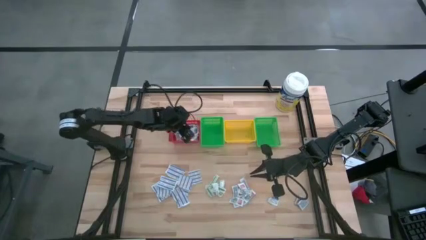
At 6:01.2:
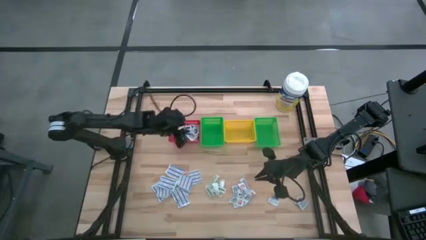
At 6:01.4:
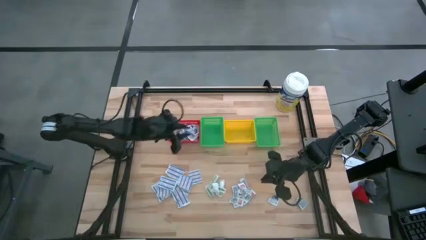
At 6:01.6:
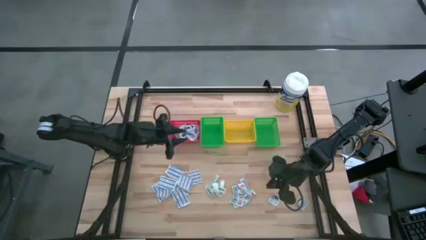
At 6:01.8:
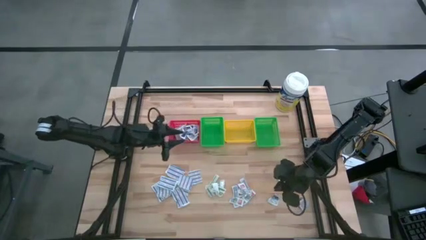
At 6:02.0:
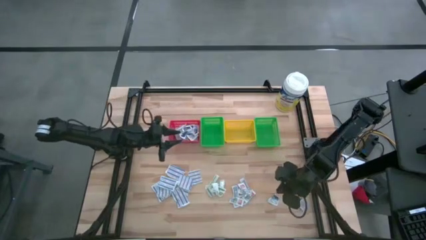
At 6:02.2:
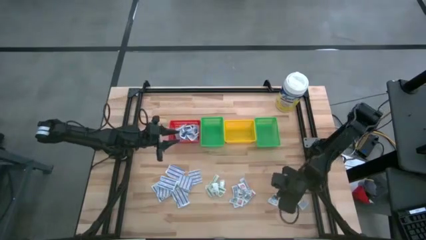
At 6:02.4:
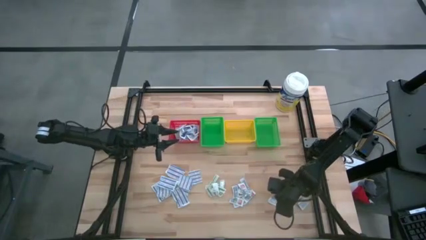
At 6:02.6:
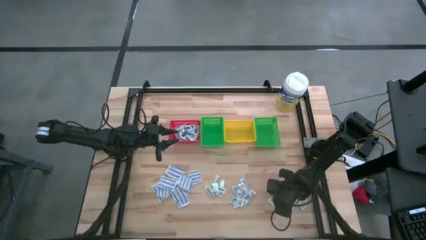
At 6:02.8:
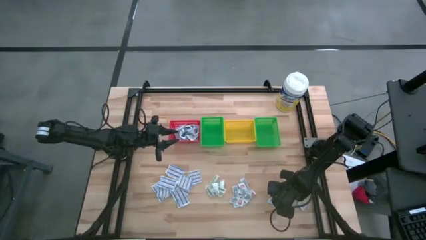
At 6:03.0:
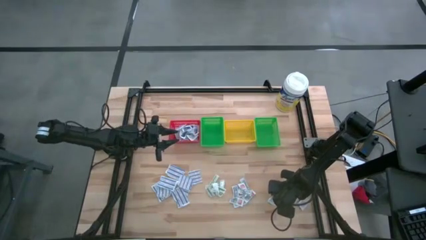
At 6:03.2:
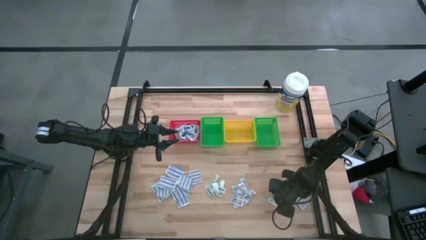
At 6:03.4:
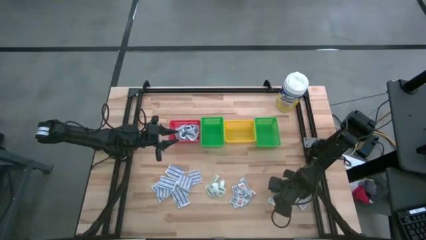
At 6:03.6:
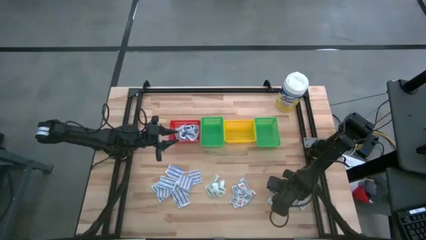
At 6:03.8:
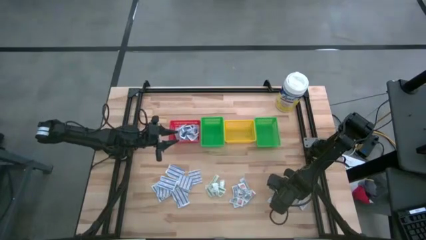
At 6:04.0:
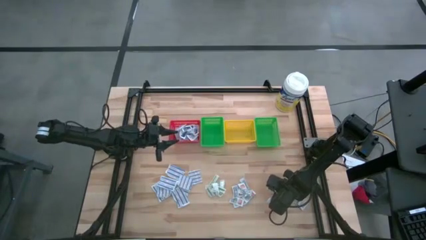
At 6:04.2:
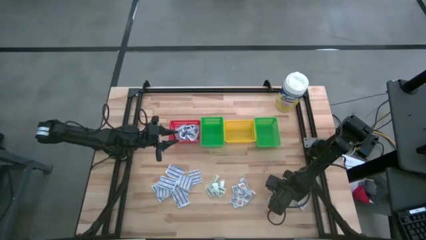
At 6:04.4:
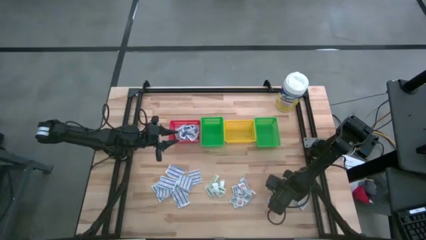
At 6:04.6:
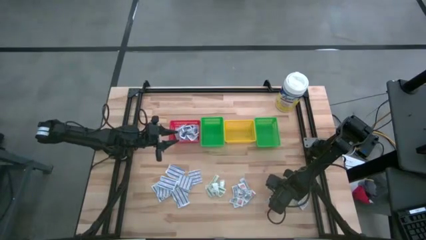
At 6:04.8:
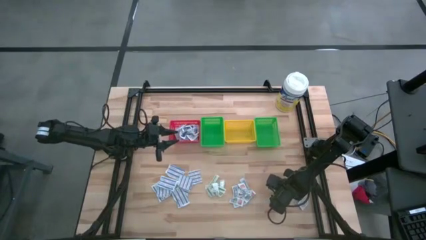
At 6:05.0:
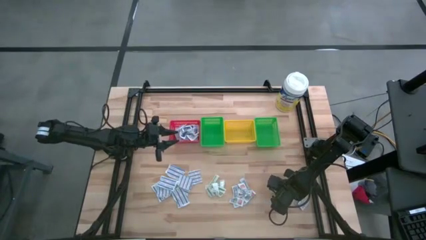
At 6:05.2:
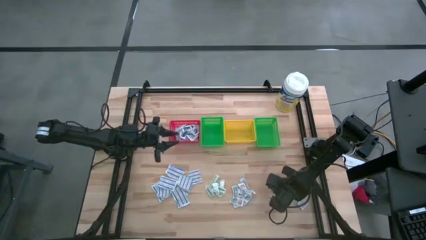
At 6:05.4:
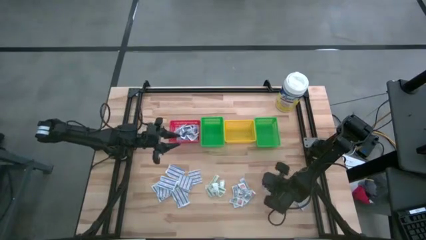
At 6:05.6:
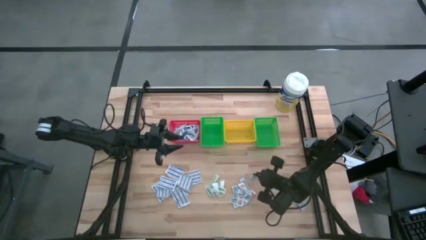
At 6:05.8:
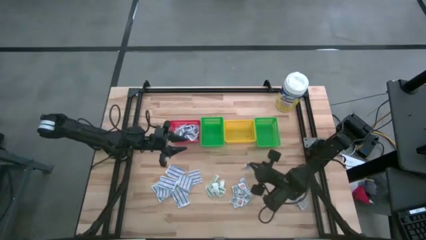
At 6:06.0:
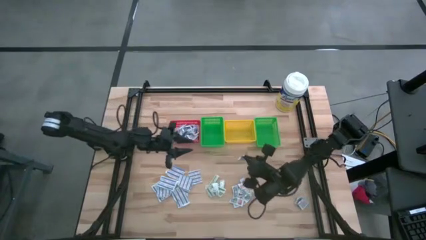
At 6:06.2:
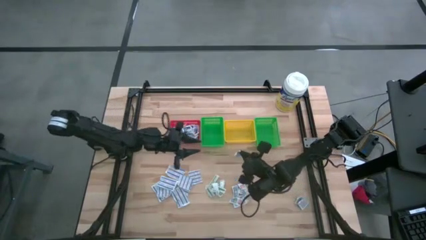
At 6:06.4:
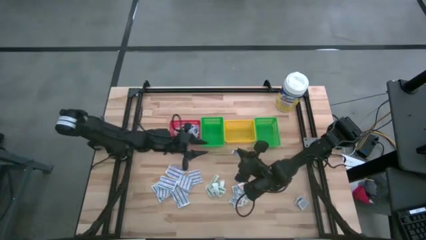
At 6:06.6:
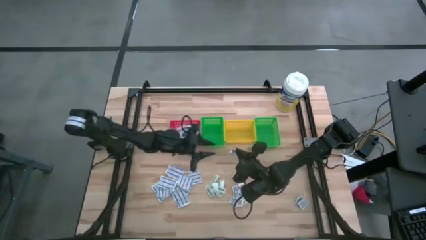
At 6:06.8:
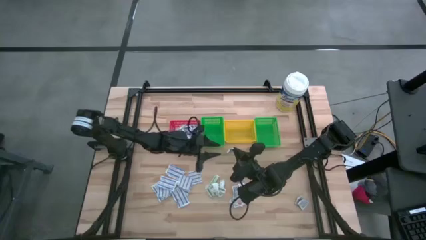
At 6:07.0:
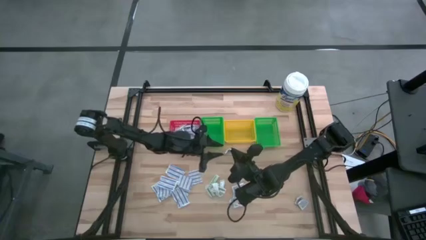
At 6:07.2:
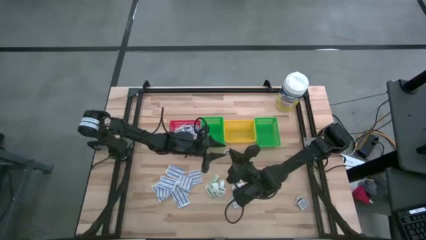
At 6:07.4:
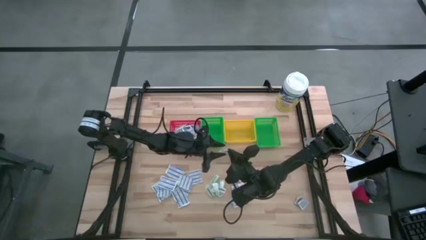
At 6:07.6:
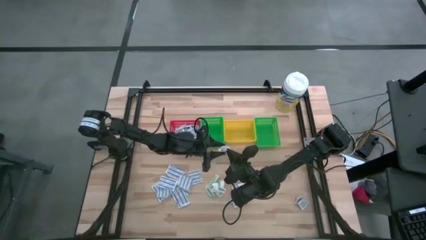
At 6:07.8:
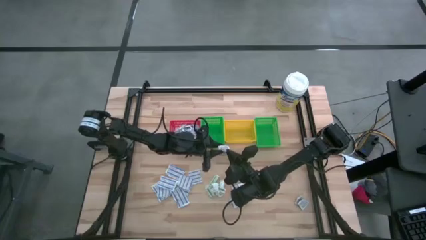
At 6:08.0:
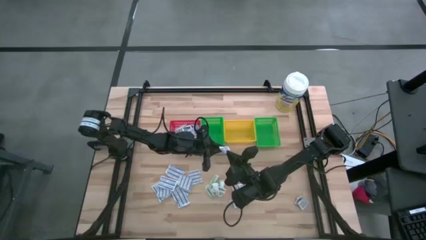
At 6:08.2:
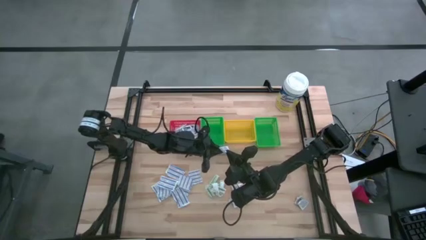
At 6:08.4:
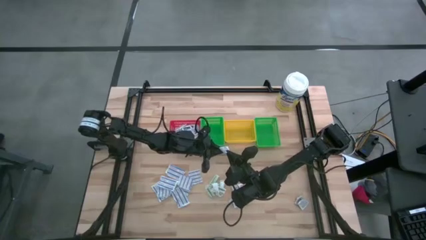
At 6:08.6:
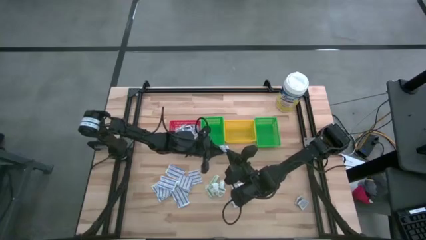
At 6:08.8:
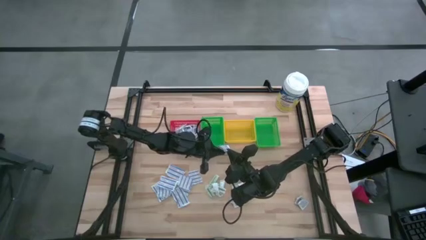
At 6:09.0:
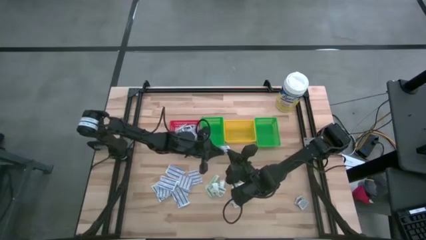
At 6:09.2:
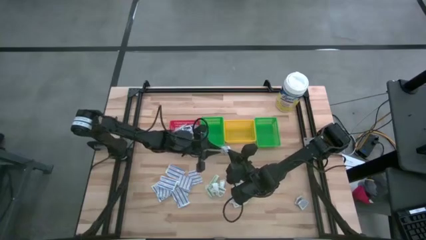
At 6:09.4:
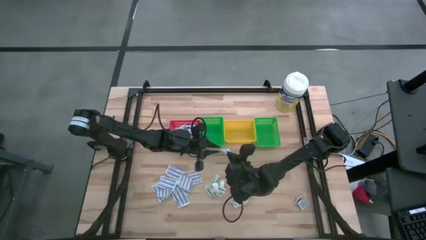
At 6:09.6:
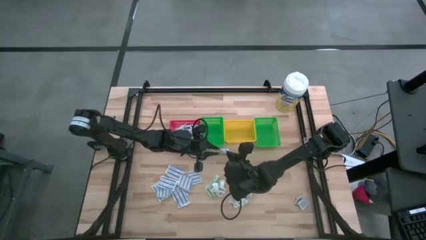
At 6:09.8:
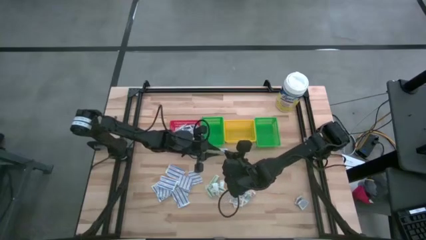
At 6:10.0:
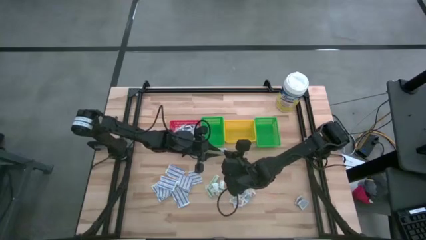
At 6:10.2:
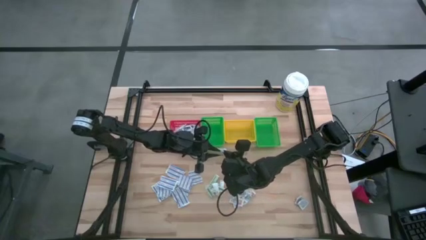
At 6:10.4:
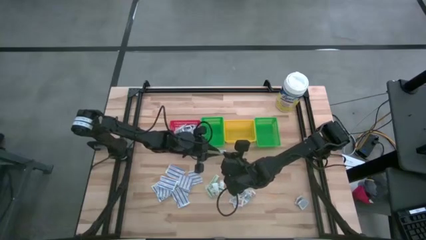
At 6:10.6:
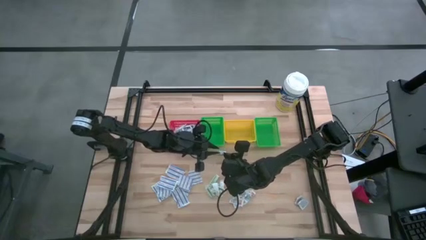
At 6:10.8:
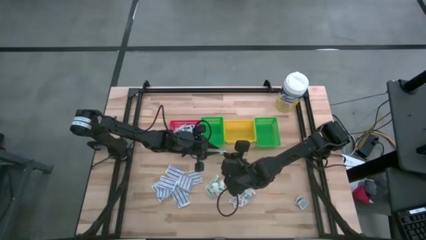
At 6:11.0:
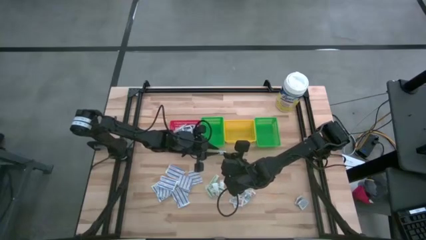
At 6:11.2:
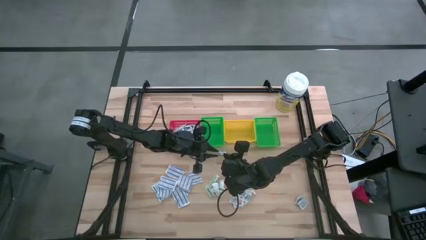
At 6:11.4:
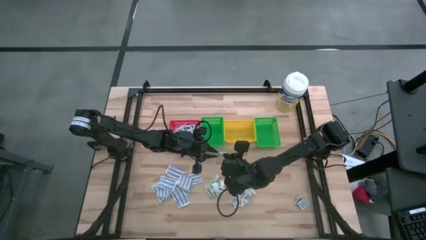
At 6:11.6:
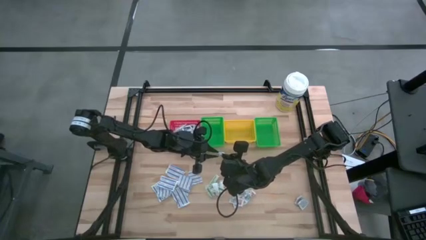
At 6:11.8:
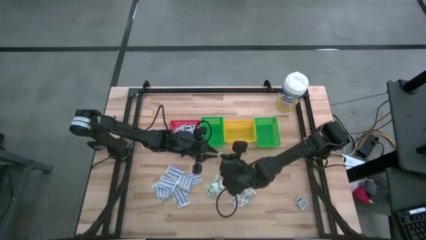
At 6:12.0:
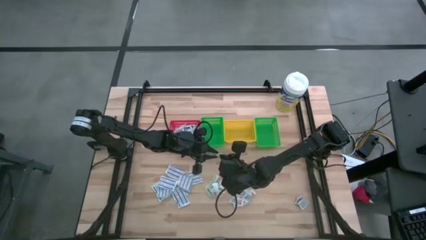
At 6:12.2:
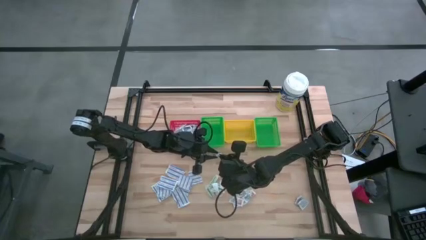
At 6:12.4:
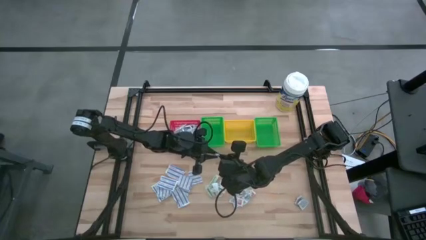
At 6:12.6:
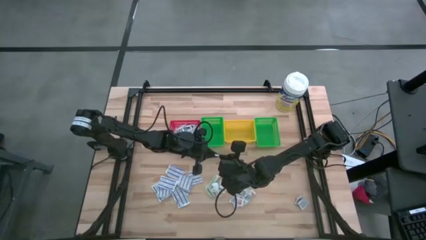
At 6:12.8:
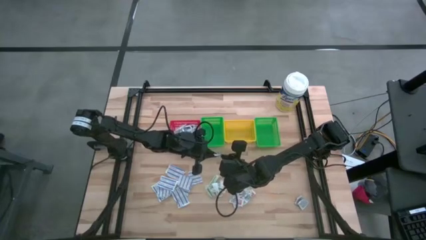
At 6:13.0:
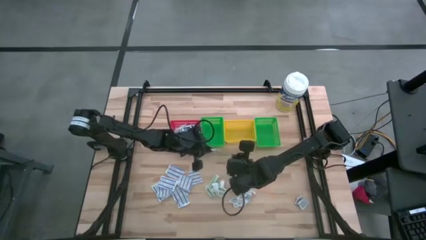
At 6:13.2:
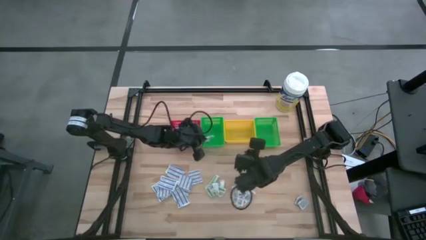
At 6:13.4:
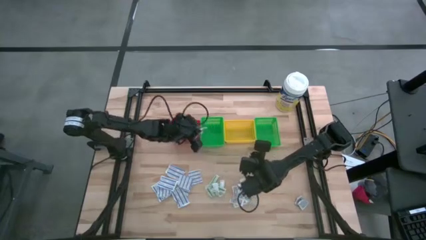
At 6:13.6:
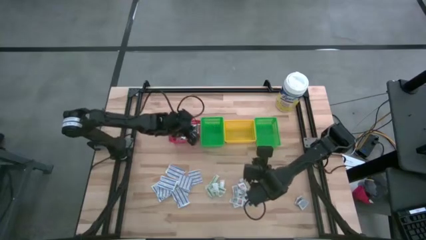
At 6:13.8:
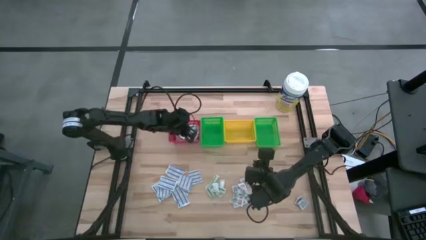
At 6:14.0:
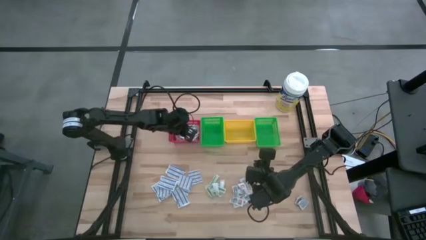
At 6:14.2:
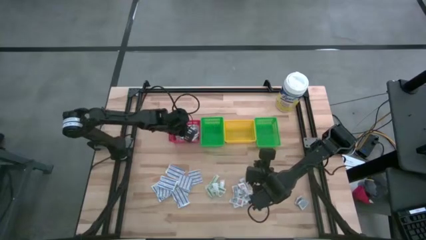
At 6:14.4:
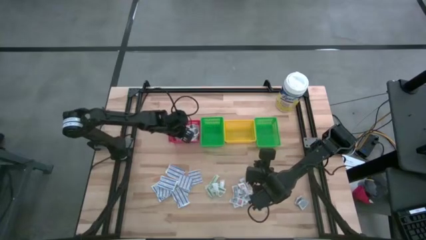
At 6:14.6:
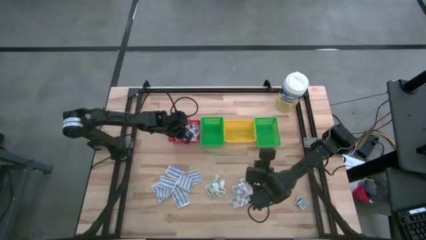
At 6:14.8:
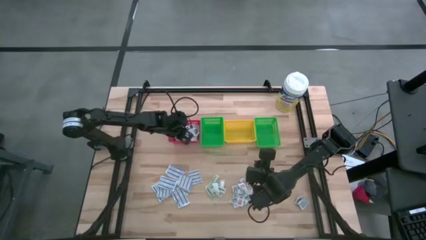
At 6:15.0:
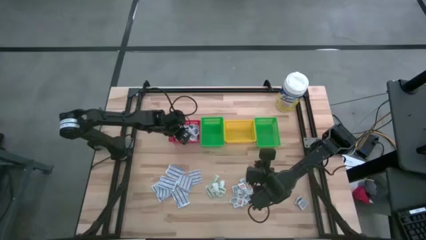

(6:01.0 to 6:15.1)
Task: Pick & Place First Aid Supplies
Put the alcohol pad into the red basket
